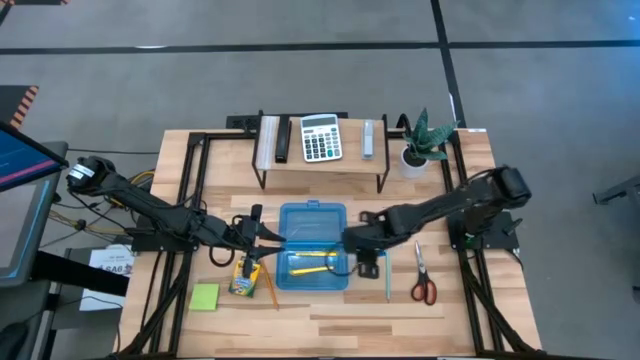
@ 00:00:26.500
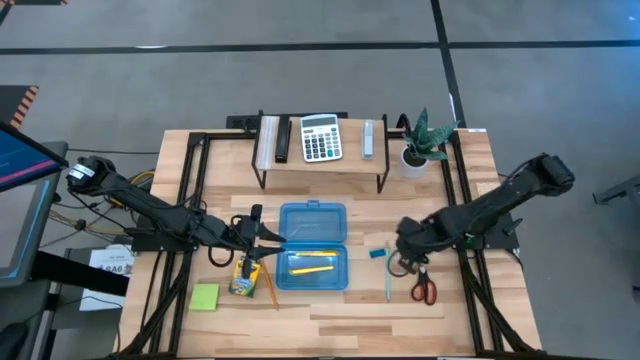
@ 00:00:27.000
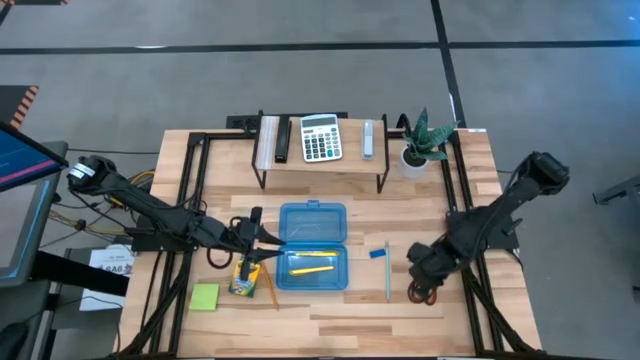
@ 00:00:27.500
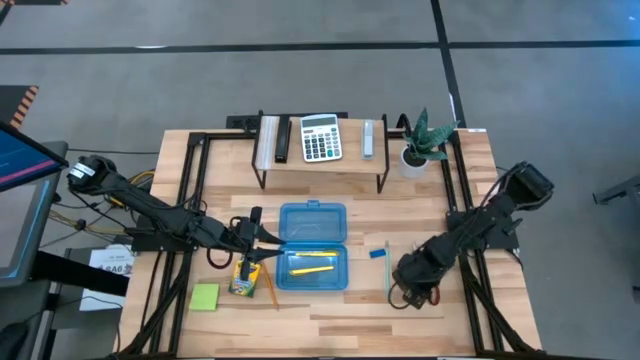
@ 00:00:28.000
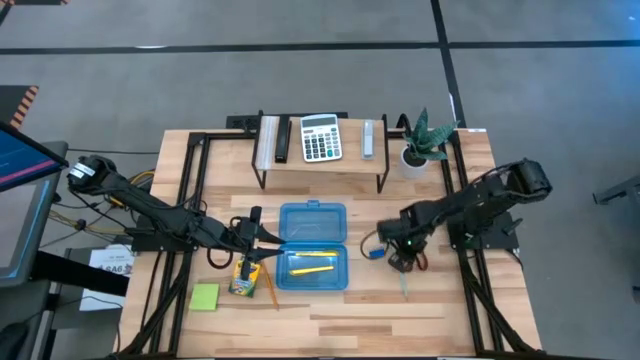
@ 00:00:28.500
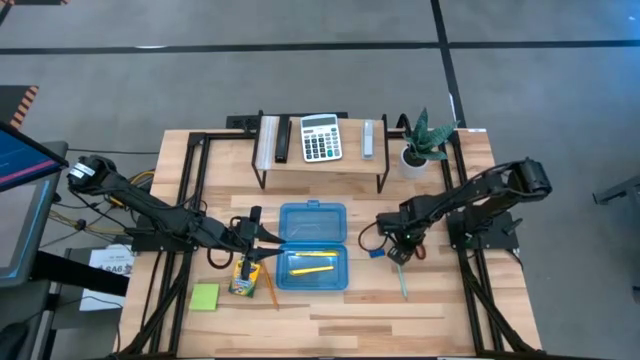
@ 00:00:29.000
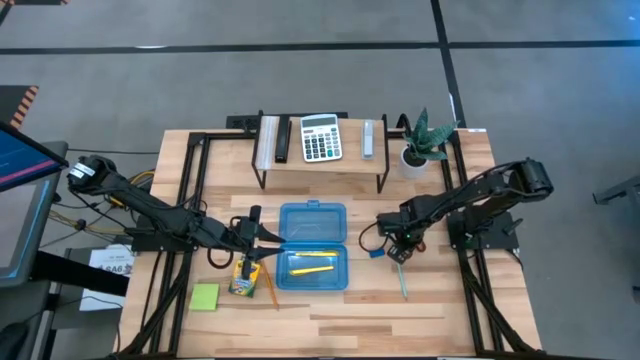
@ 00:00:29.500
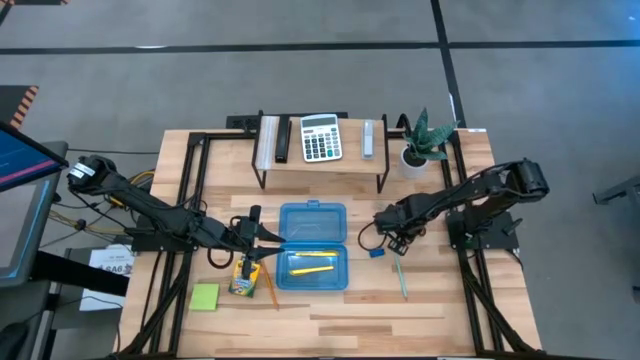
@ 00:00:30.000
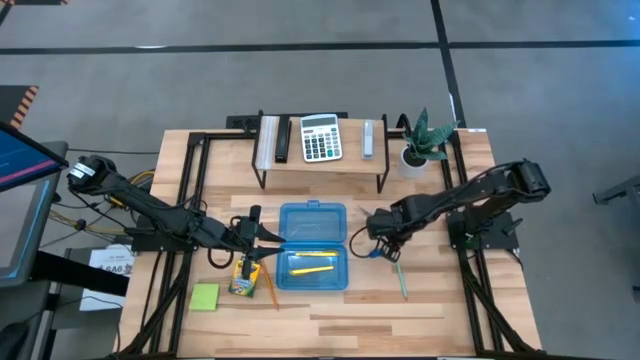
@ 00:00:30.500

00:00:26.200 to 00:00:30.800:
Task: Pack school essentials
Put the black scissors into the supply box

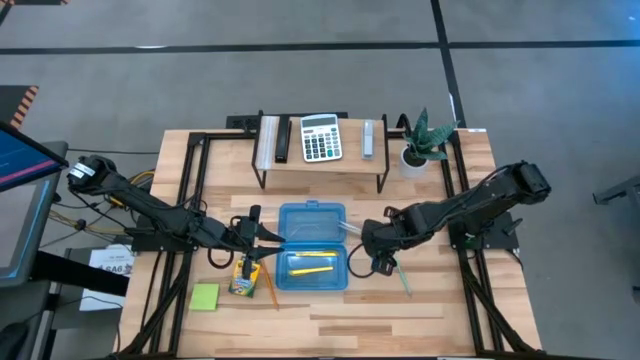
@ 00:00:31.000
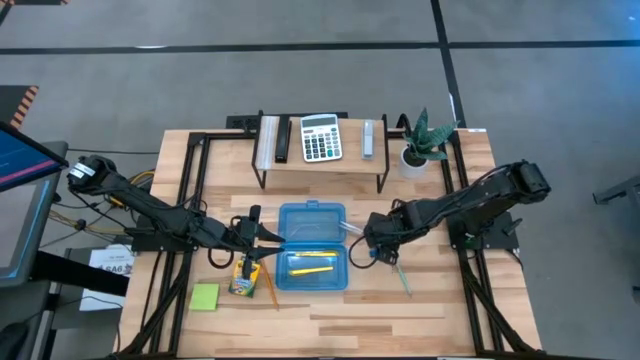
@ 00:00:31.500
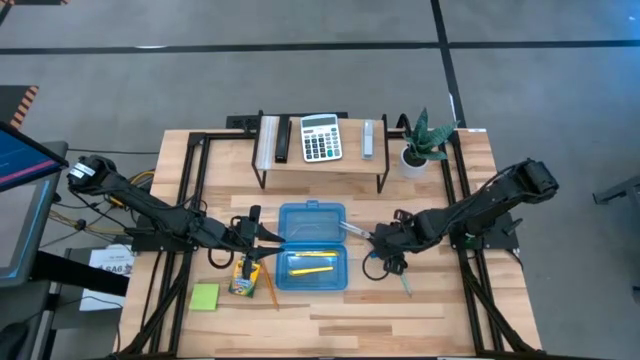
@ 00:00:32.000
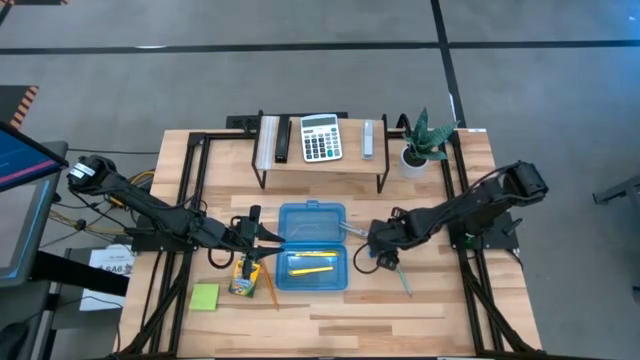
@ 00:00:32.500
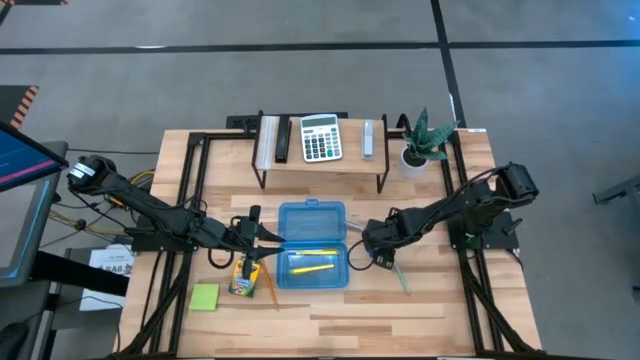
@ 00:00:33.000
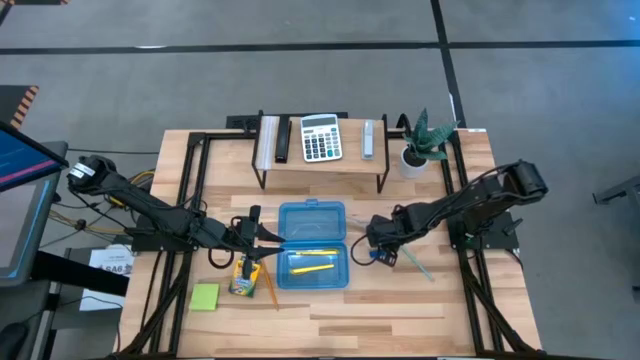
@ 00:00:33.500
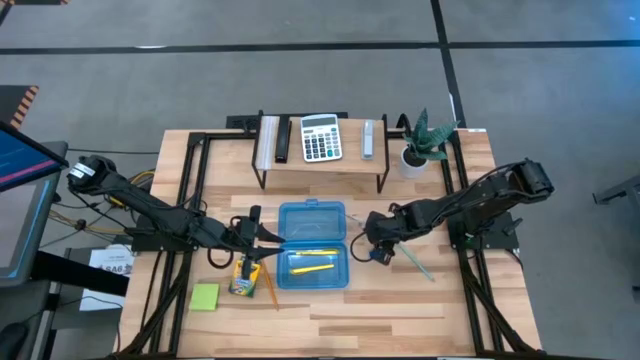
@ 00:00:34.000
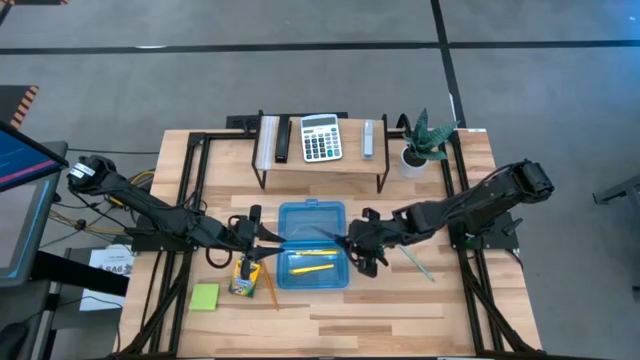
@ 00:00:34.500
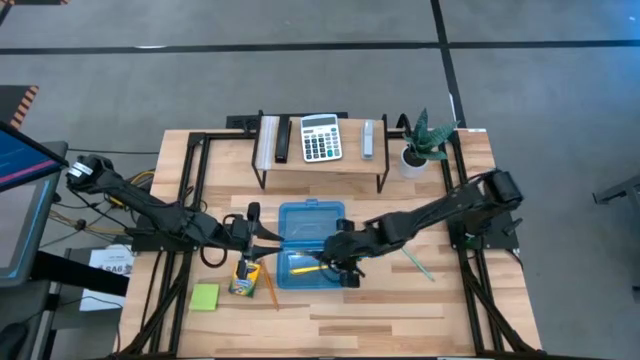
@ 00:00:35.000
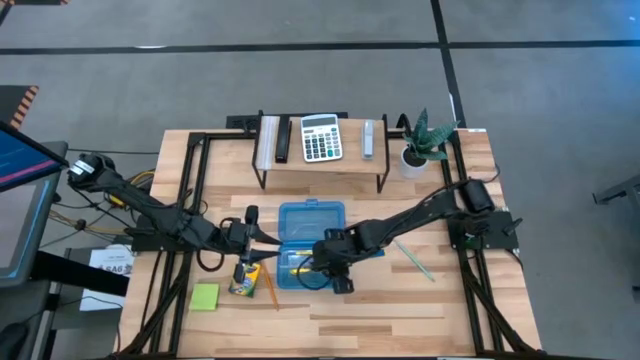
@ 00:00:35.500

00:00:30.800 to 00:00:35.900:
Put the black scissors into the supply box

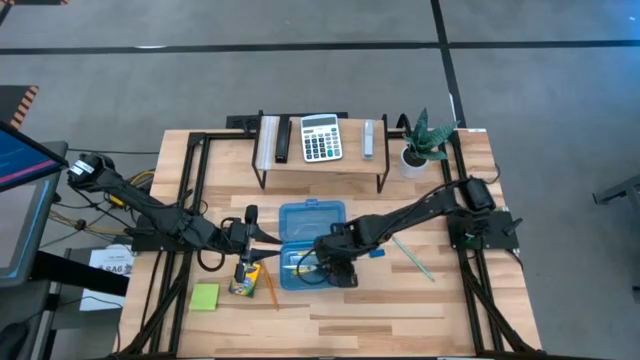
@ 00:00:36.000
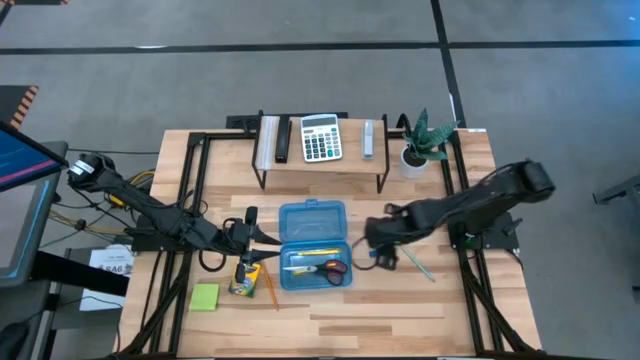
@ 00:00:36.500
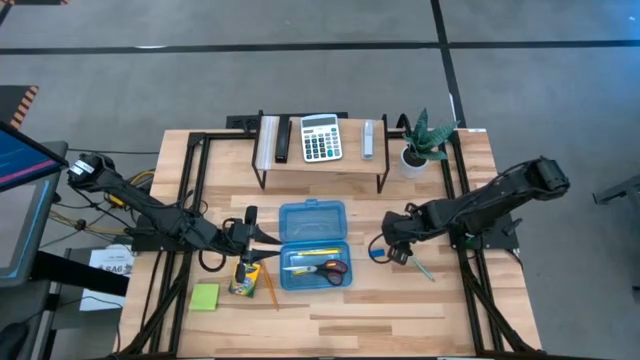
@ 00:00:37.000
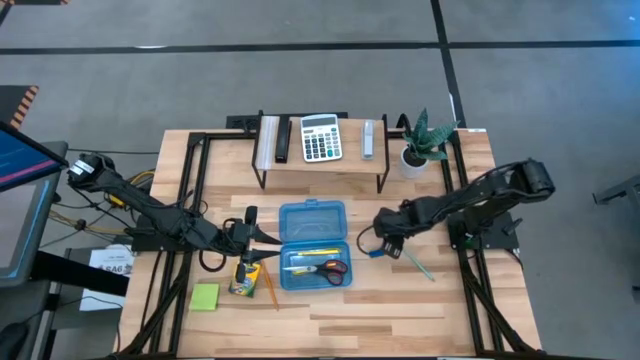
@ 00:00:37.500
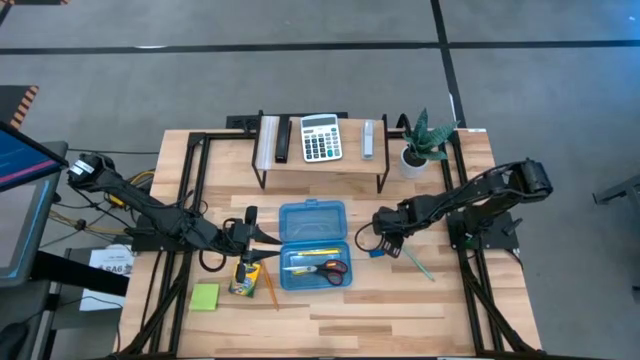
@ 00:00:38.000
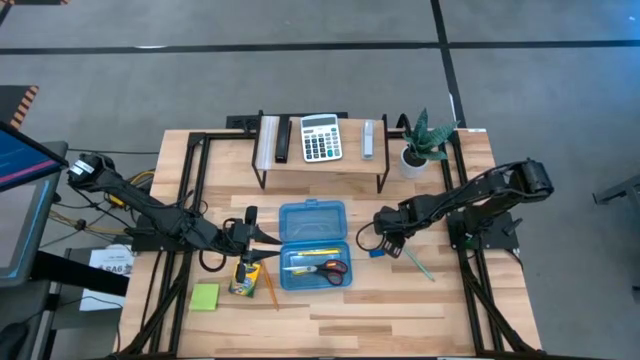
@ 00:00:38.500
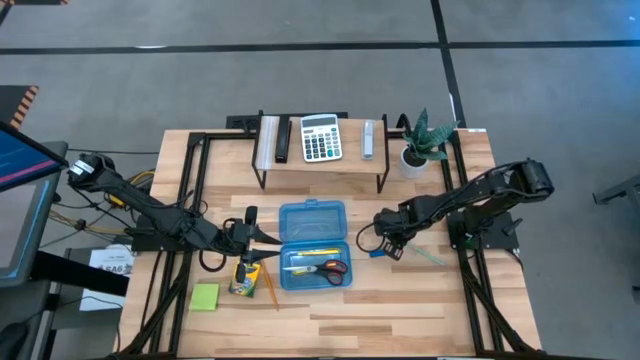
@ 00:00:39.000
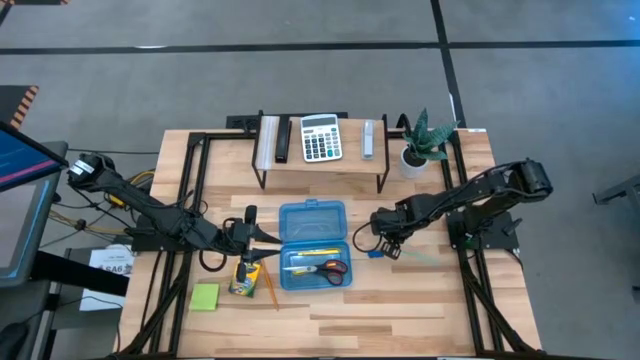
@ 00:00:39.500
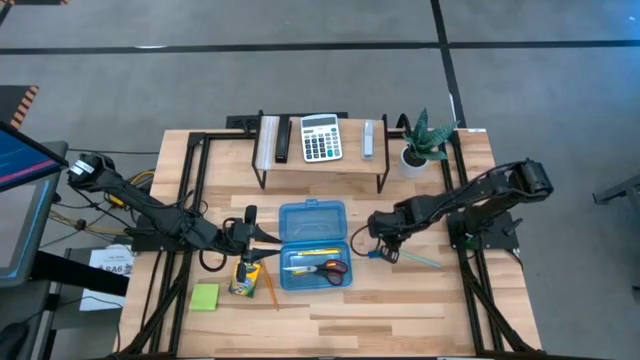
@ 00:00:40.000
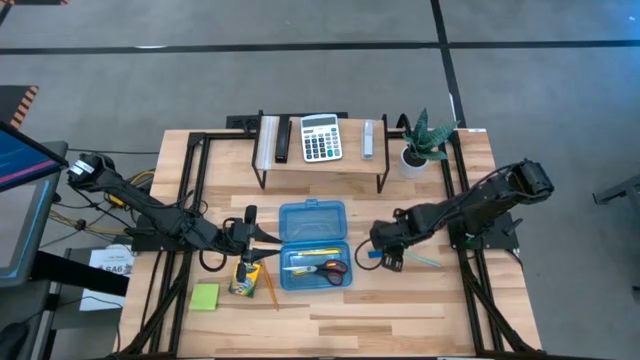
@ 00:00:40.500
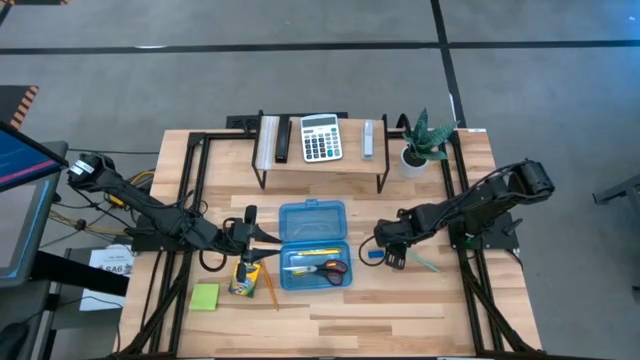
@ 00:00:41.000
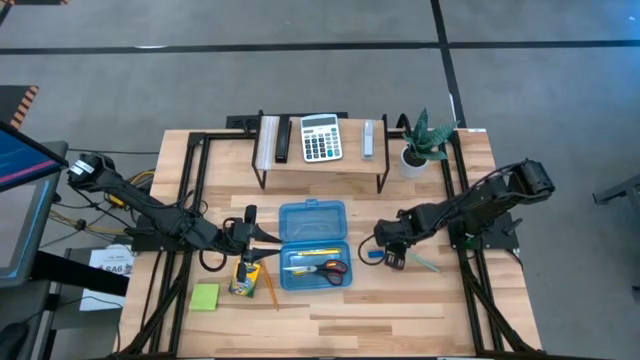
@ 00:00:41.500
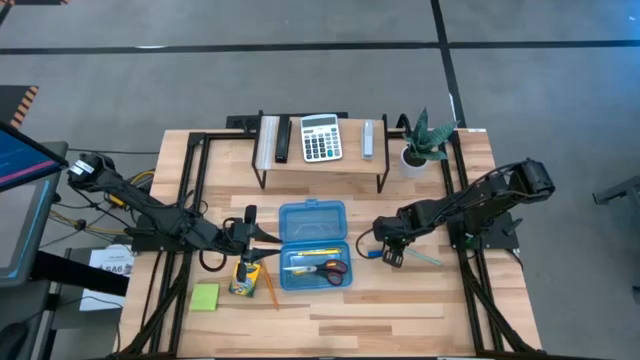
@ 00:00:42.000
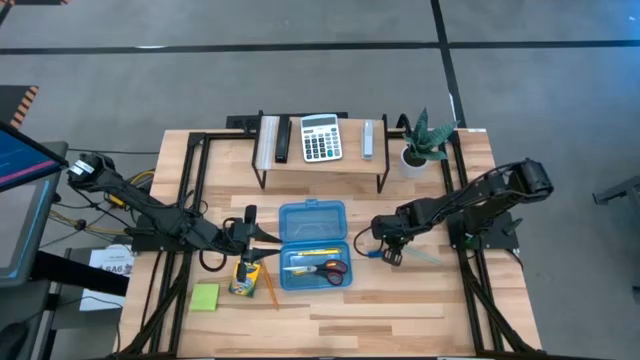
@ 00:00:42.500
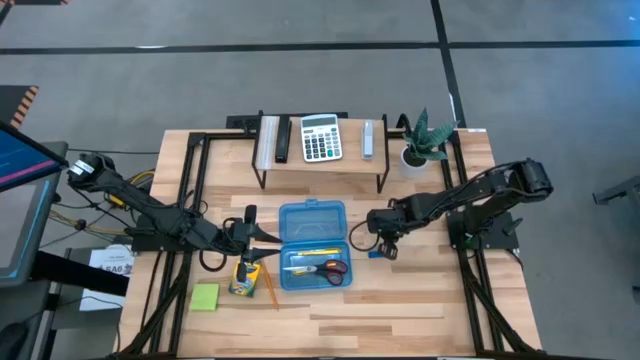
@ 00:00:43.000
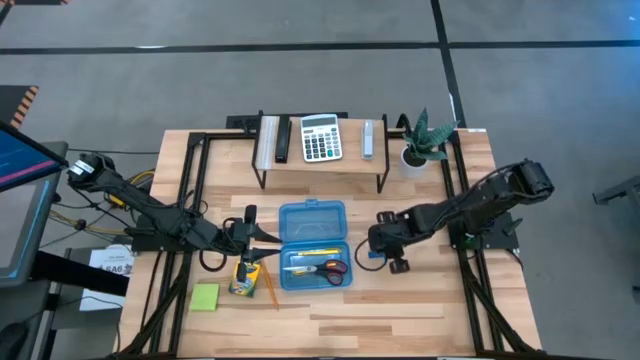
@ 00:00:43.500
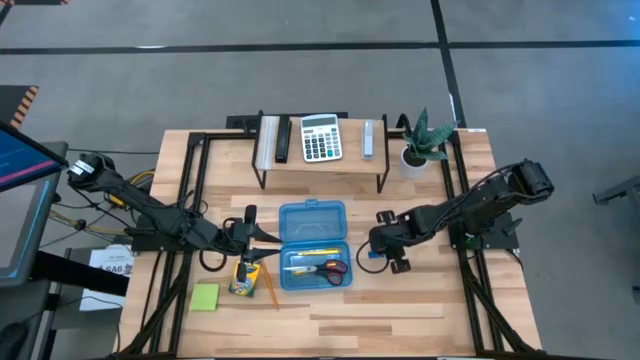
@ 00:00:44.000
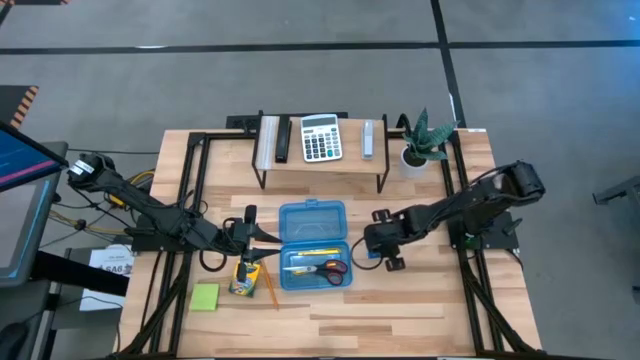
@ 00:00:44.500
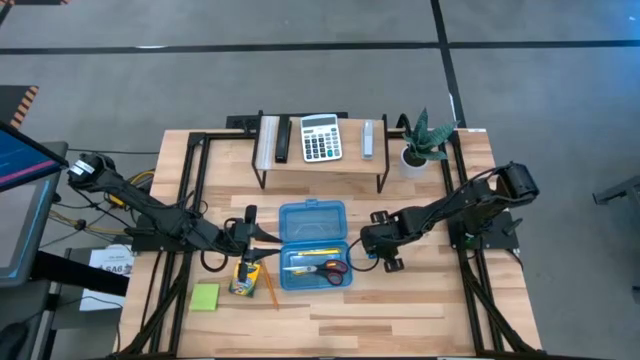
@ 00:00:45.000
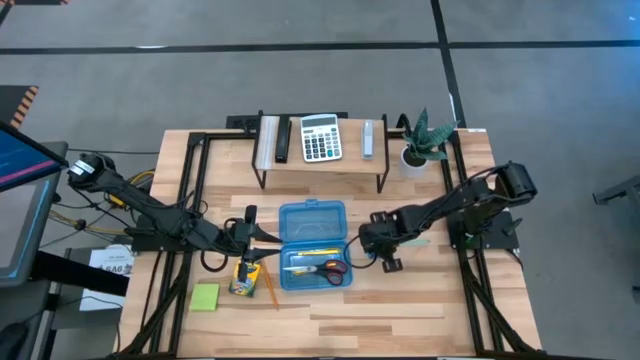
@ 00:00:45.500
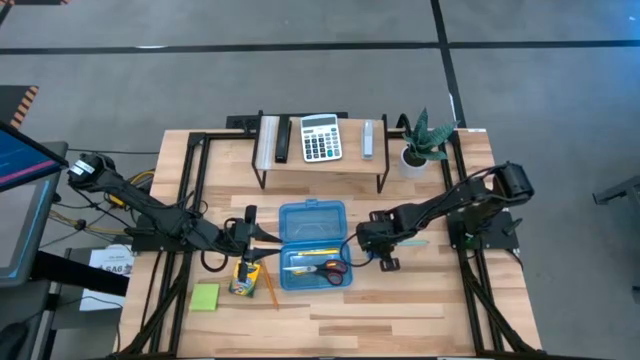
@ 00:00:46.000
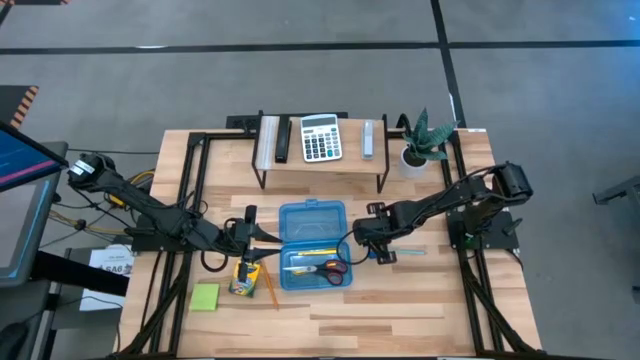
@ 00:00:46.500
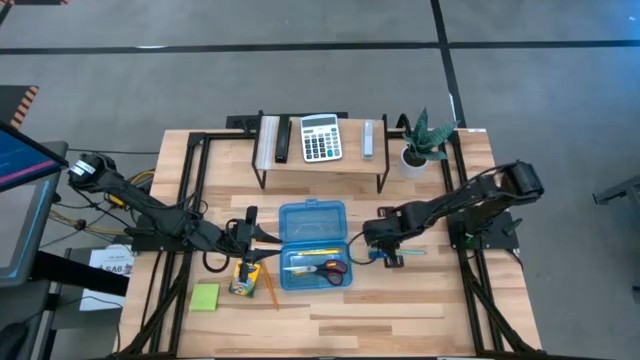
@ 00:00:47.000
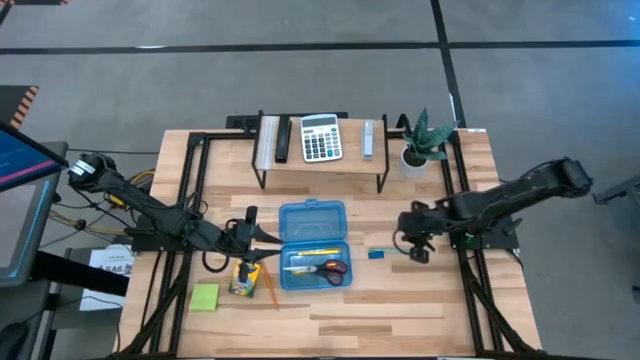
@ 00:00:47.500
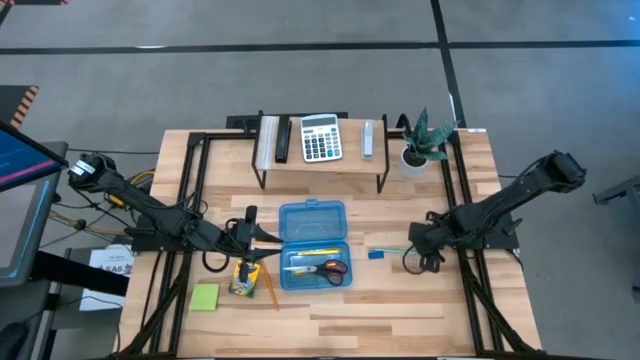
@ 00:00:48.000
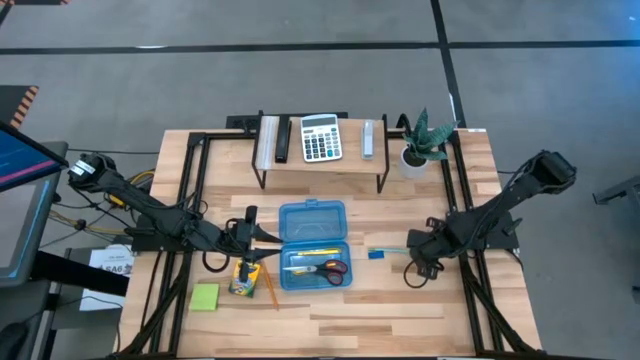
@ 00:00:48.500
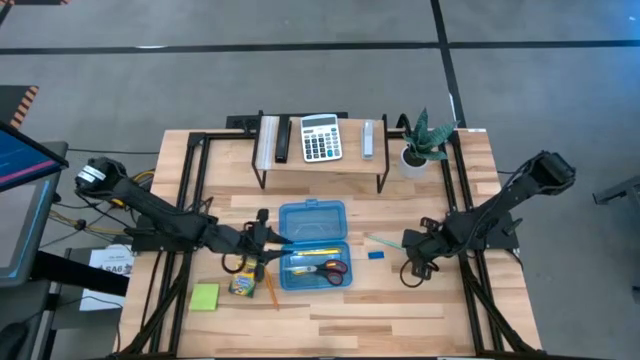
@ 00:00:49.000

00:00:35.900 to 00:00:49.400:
Put the blue pencil into the supply box
